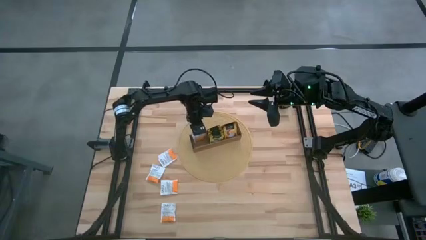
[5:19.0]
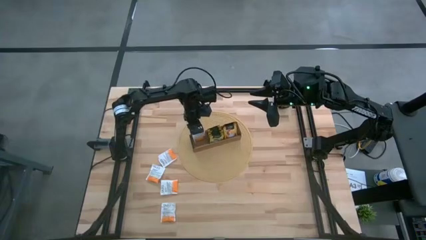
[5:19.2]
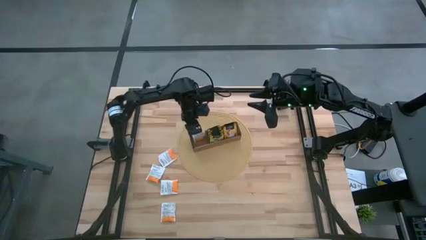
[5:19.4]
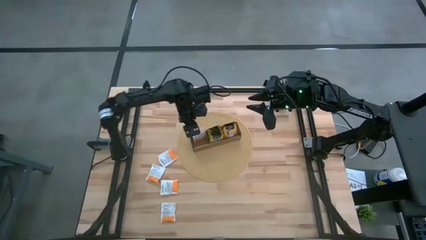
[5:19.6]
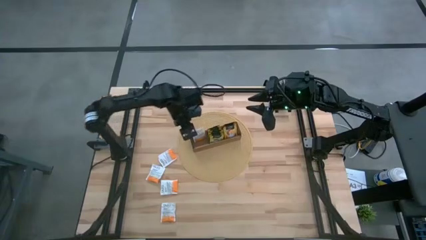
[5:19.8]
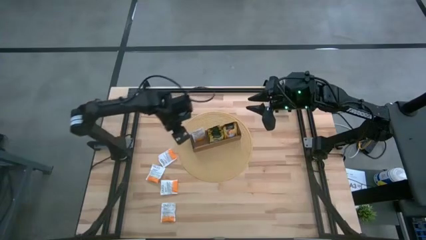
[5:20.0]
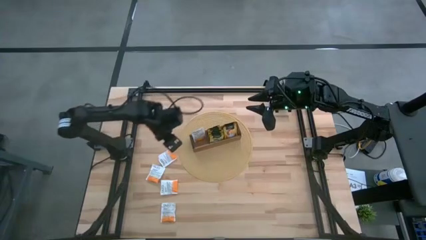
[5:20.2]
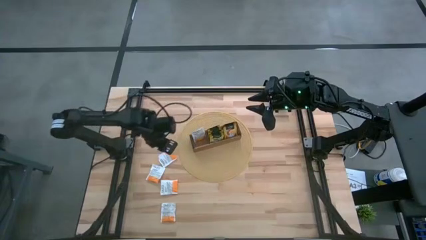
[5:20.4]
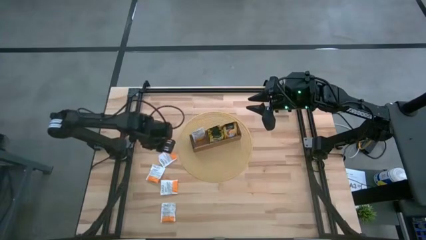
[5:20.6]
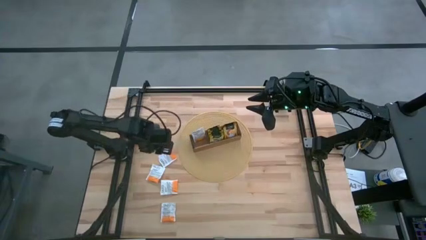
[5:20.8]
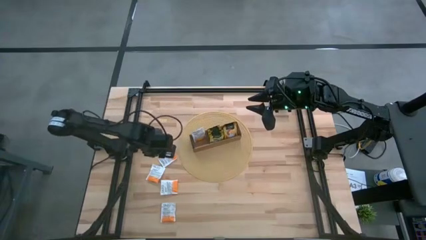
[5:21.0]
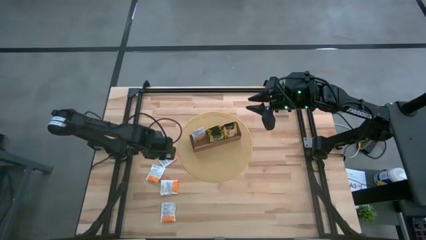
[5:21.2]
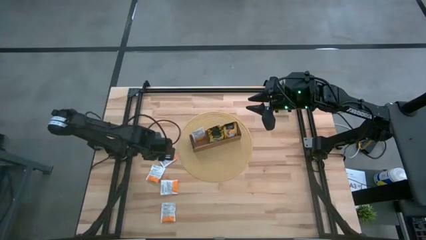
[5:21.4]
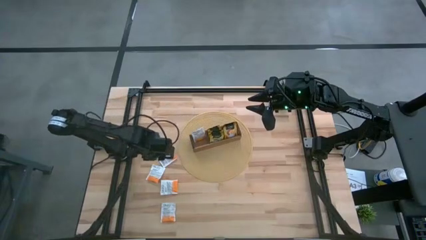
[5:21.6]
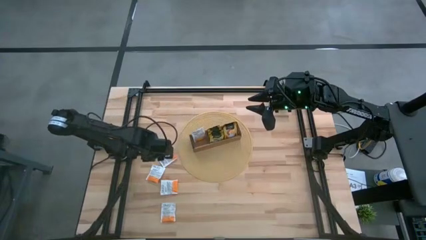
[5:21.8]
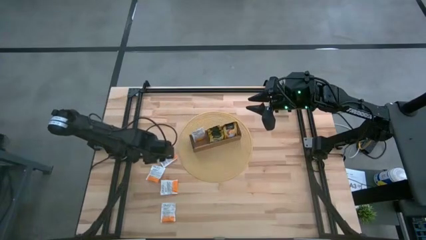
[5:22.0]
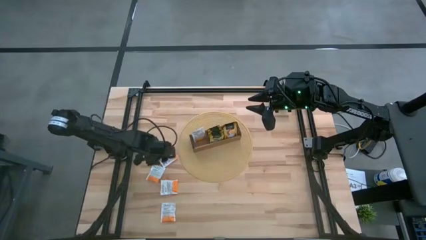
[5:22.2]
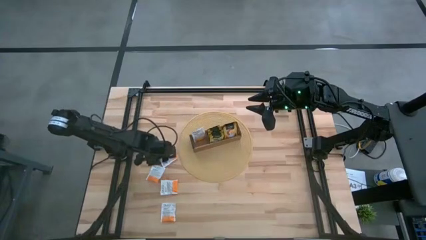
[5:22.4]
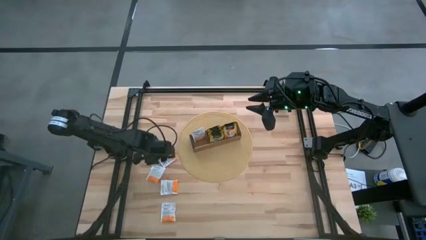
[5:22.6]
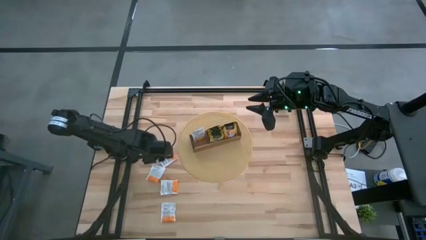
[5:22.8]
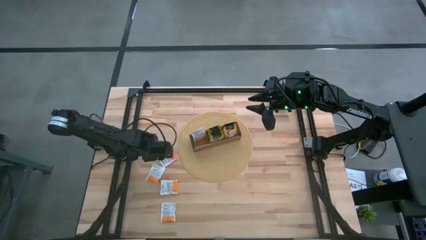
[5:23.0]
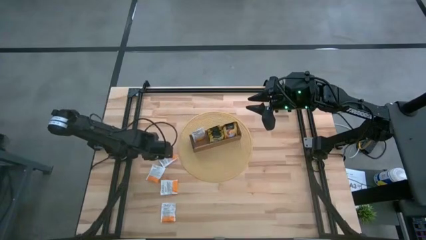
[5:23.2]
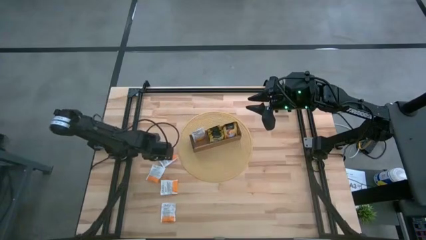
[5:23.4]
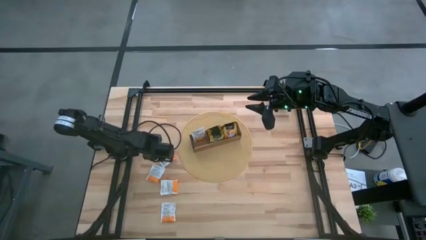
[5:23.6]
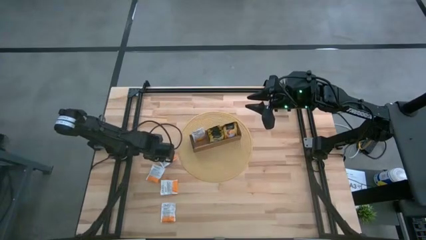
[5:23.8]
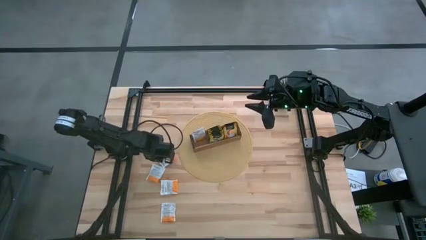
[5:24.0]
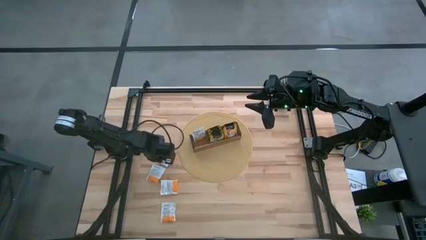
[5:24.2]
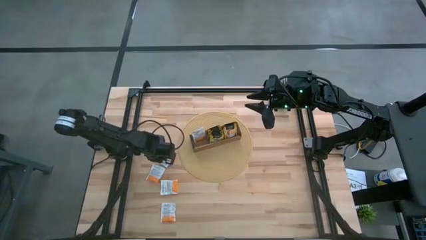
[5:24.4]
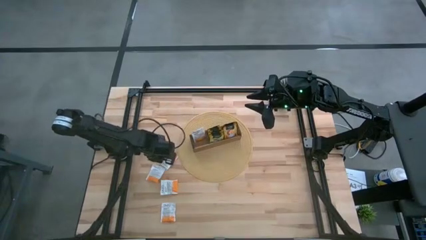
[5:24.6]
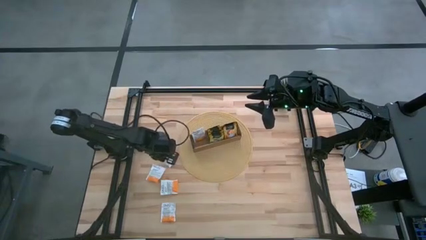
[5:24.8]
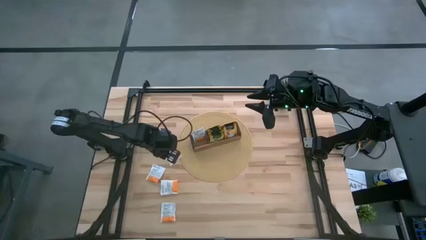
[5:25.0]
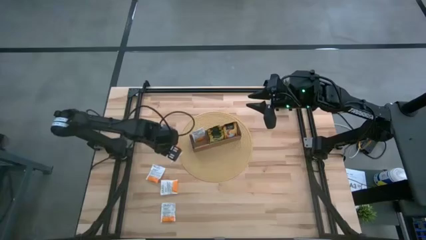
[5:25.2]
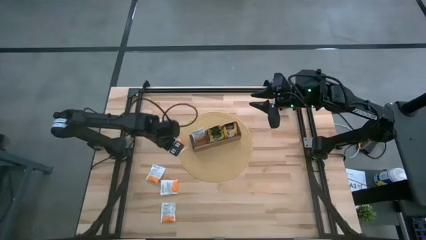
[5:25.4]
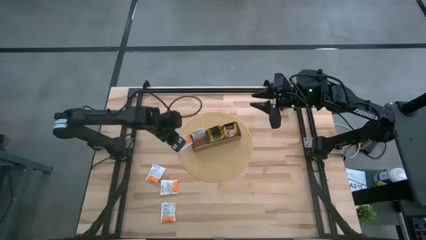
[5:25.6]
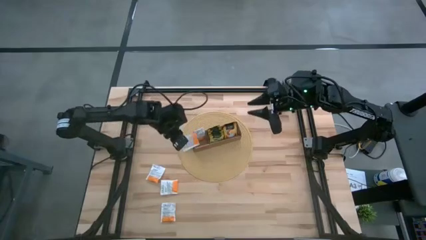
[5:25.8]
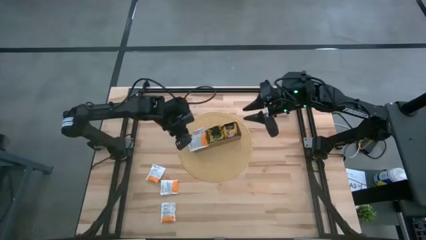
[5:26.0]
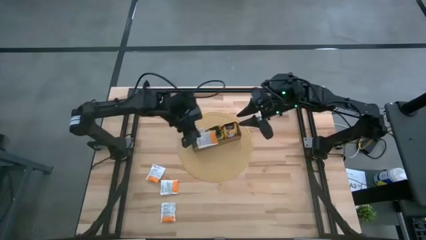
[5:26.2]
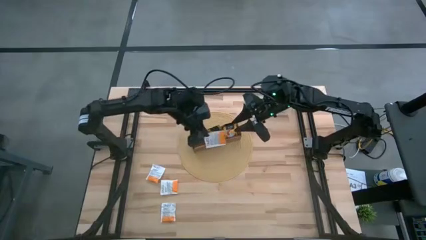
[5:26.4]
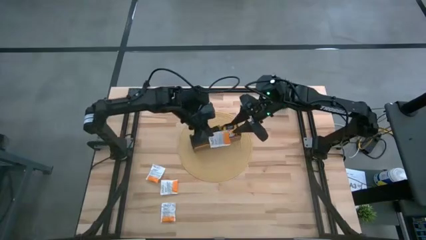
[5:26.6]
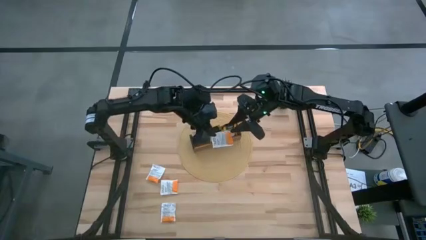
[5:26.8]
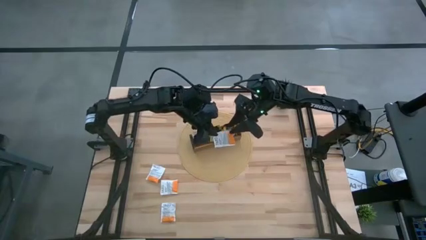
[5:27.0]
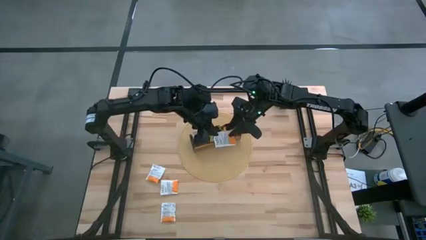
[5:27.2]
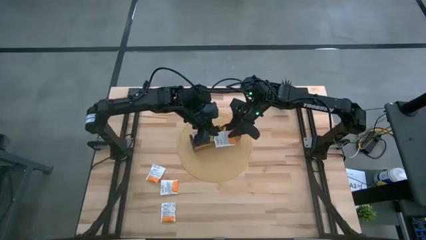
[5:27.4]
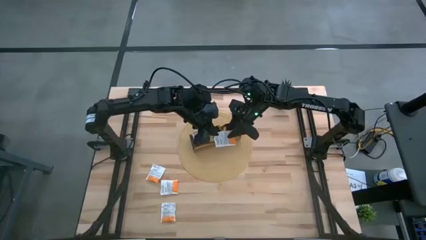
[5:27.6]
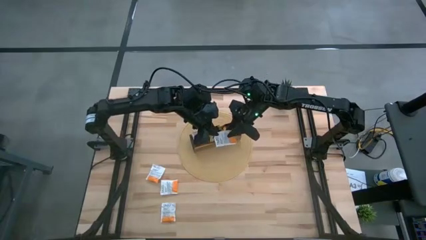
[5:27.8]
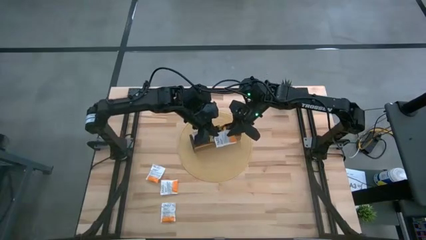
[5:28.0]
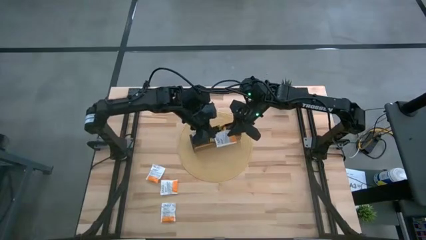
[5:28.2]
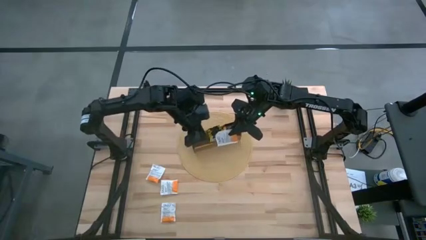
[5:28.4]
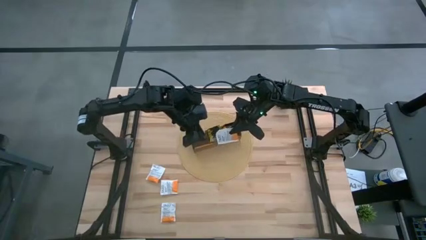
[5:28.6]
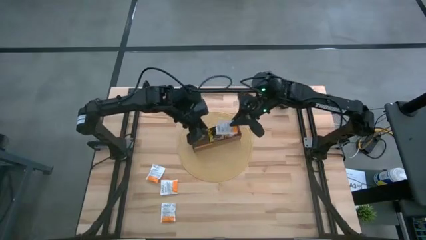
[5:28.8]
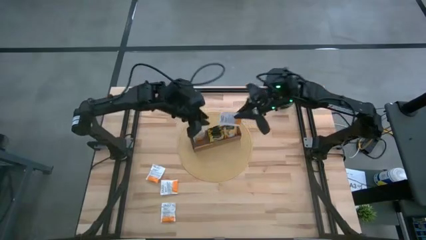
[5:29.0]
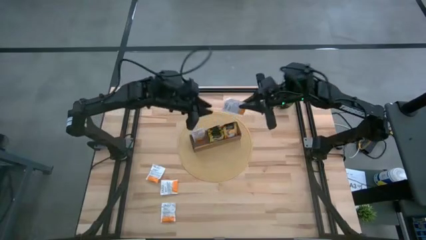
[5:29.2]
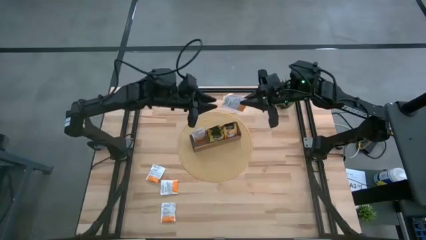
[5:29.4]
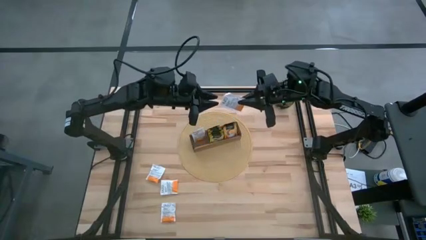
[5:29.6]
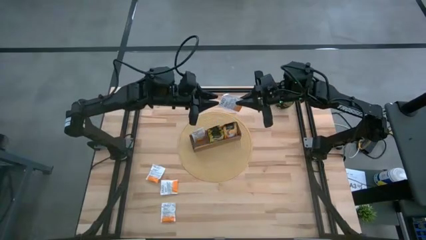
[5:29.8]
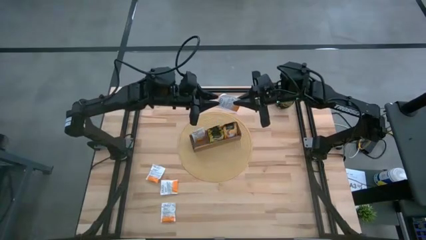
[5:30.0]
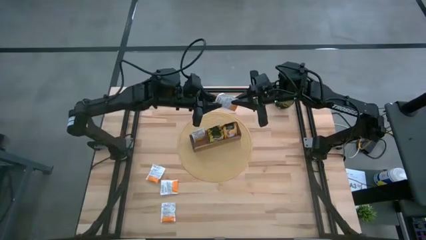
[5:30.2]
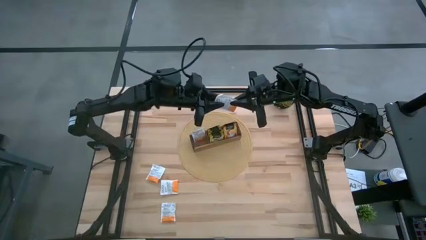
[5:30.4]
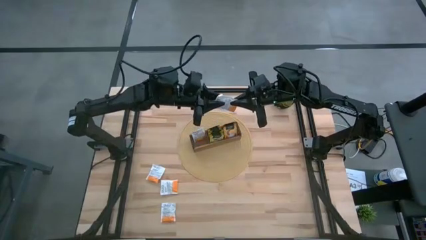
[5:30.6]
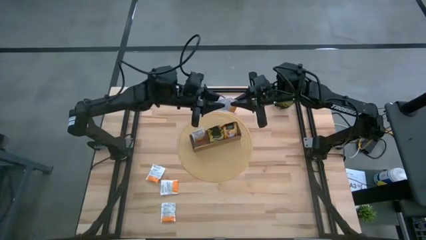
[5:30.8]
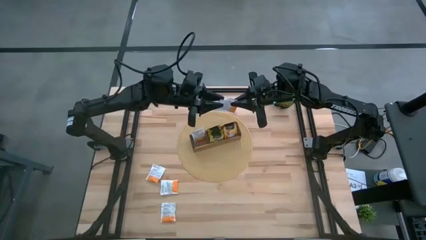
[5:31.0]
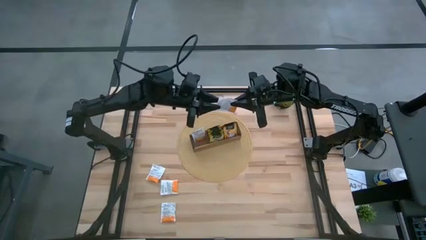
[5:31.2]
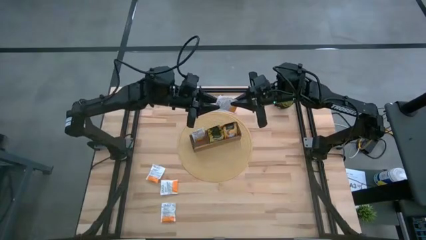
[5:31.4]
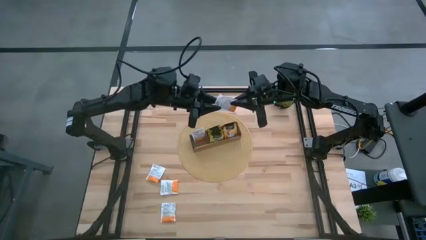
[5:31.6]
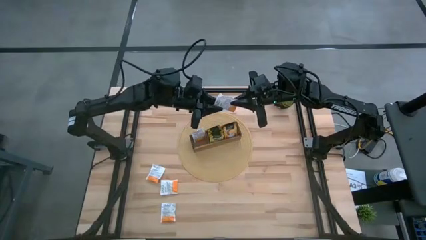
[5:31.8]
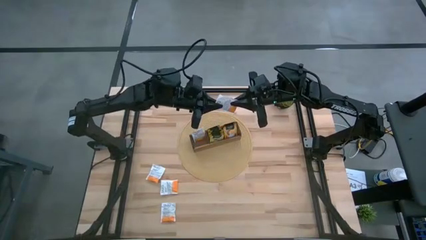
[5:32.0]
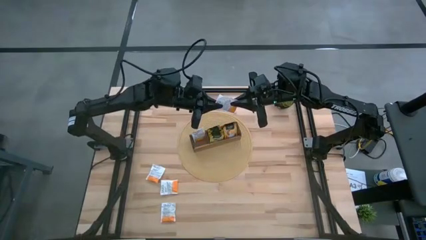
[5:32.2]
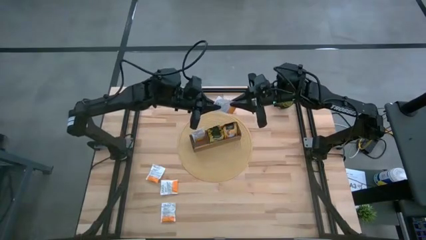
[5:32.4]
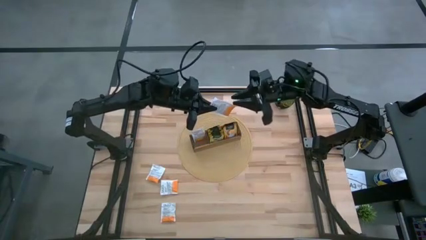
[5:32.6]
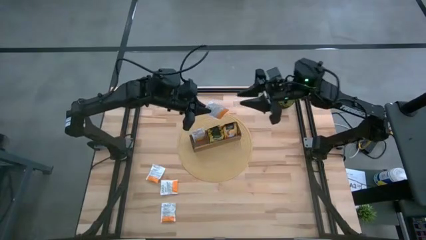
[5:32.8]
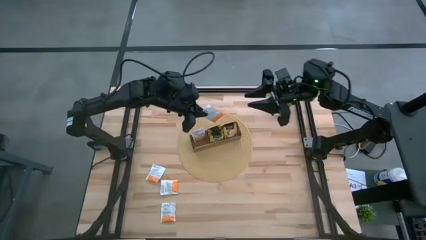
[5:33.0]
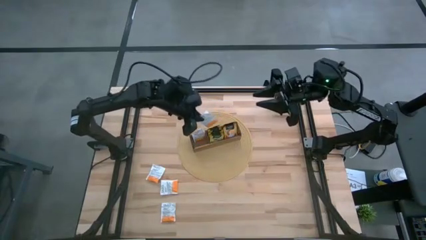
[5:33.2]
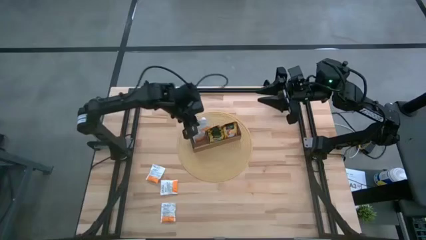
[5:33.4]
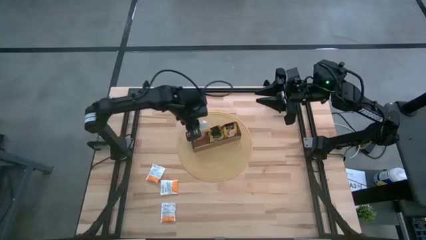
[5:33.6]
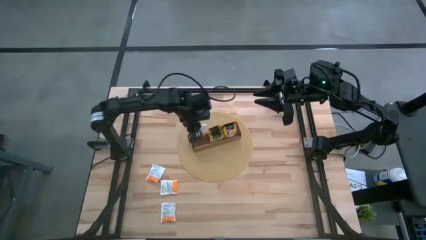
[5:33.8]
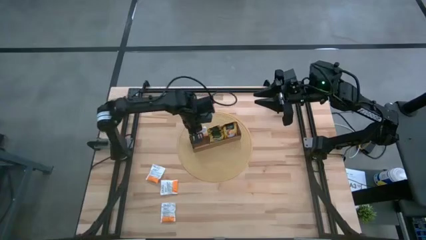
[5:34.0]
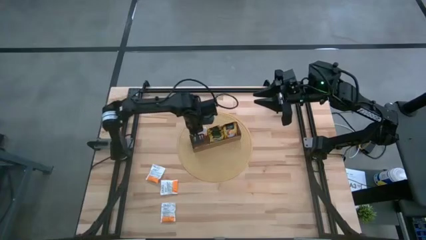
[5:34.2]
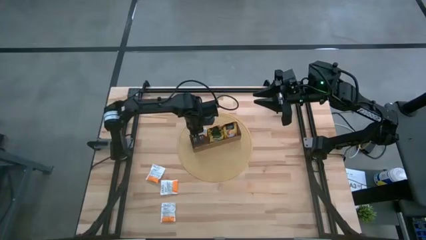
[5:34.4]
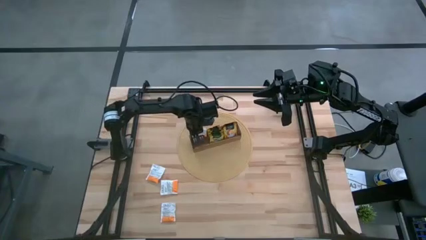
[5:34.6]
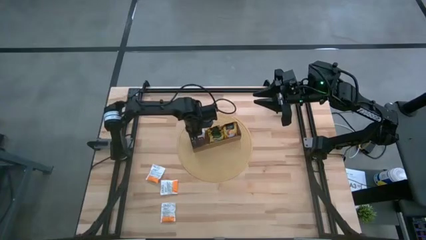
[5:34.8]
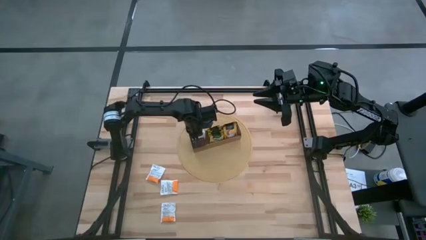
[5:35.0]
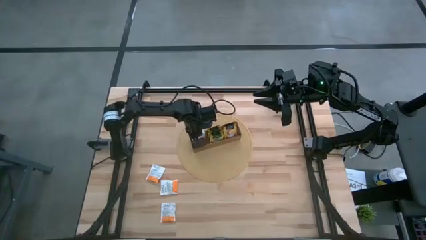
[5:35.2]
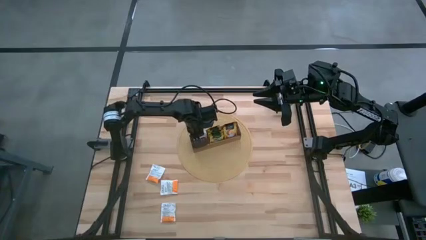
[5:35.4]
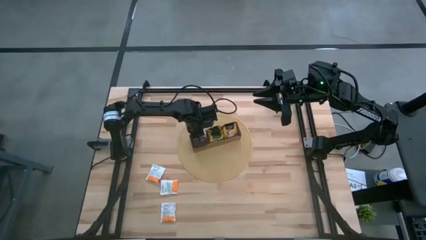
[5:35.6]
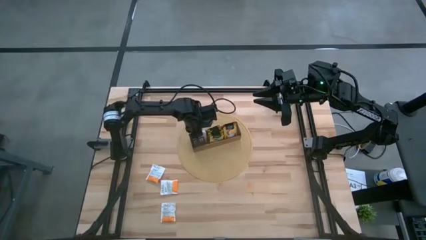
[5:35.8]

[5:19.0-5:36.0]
Task: Pick & Place Tea
Put the white tea bag into the left section of the wooden organizer
